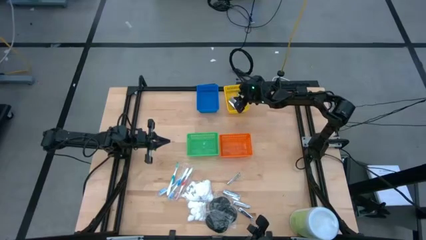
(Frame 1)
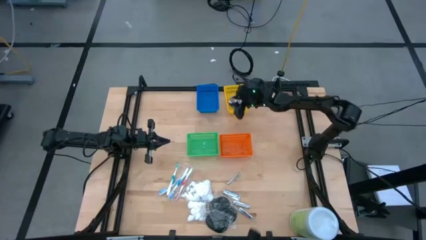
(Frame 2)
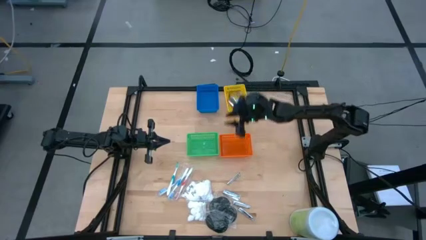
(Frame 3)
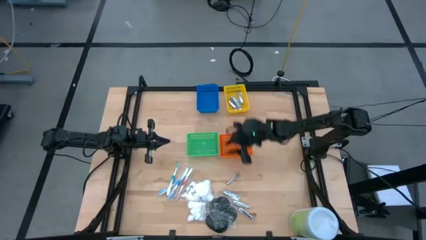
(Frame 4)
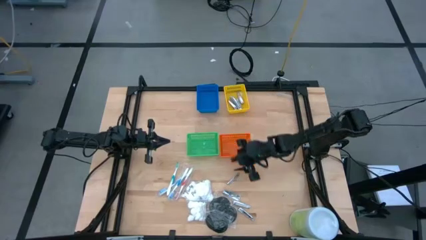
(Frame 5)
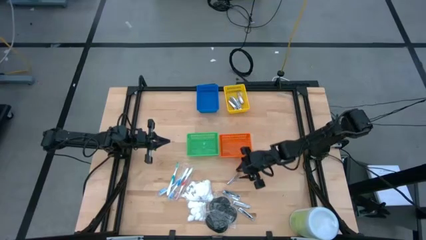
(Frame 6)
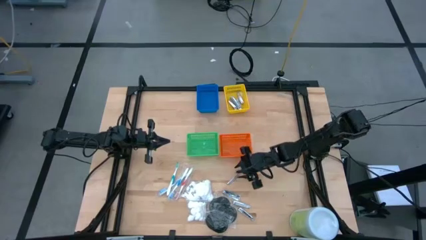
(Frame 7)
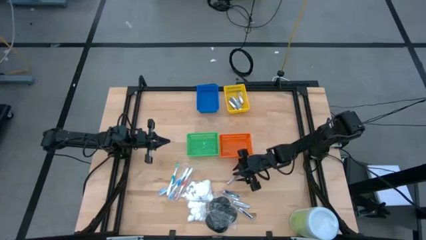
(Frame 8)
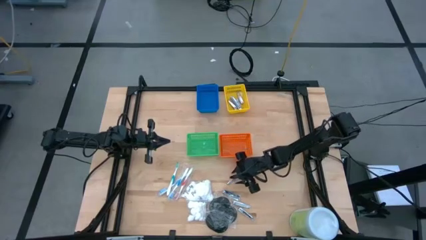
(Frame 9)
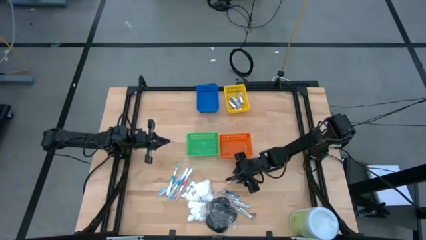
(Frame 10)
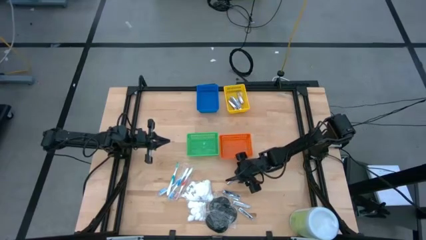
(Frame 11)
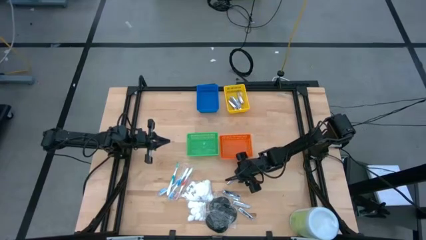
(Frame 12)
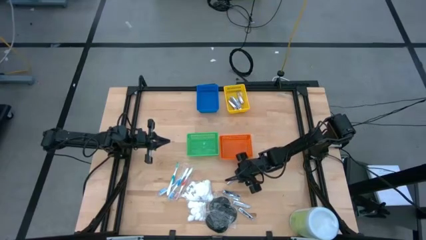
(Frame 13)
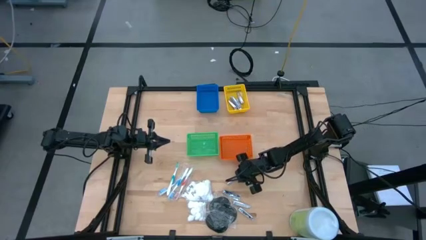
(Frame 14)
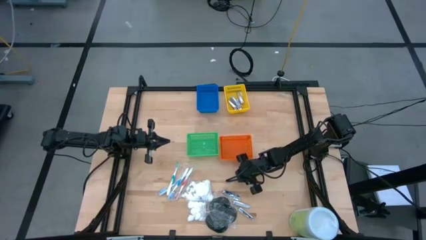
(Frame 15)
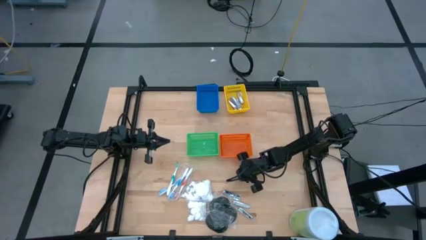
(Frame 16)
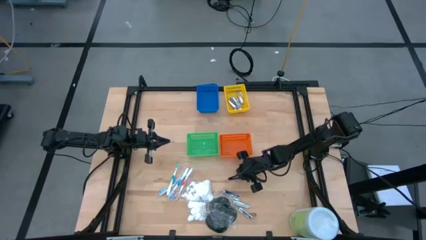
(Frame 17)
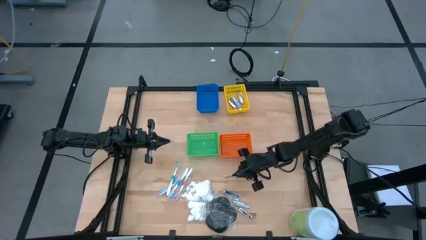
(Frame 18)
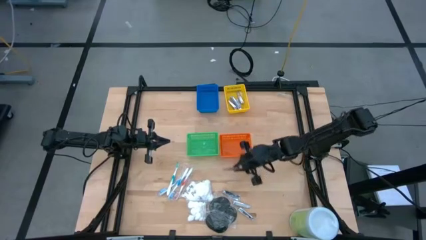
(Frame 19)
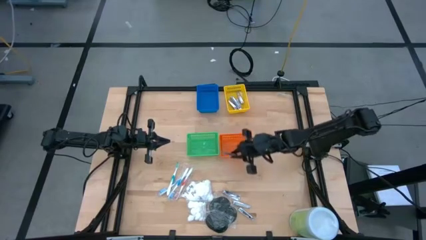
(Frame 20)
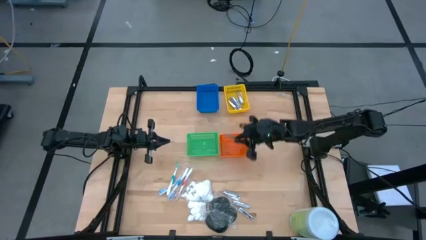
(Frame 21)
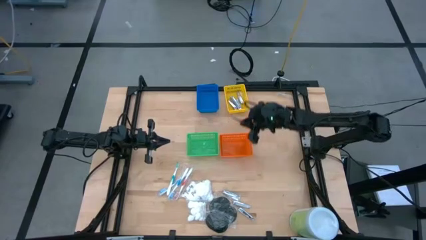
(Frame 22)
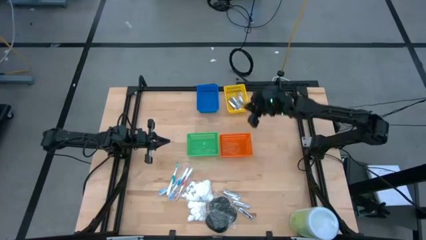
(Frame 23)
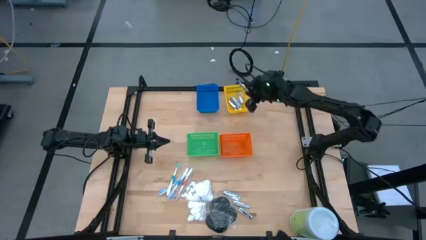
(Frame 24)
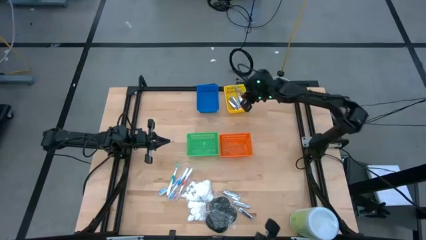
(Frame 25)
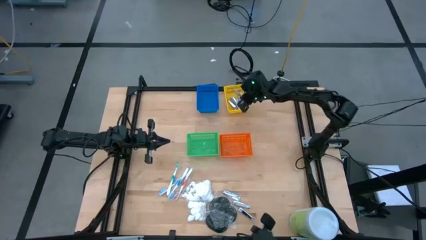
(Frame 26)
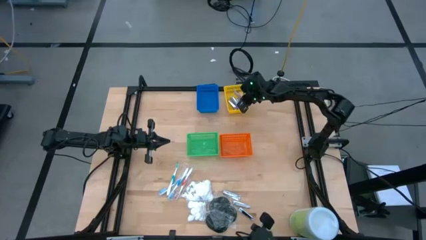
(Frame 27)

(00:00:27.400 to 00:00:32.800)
Task: Pick & Place Travel size toiletries
Put the nail cutter into the yellow bin

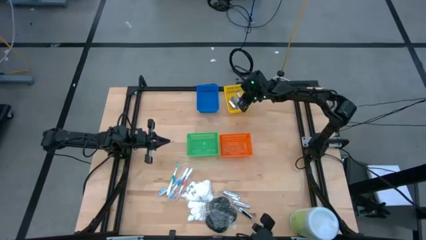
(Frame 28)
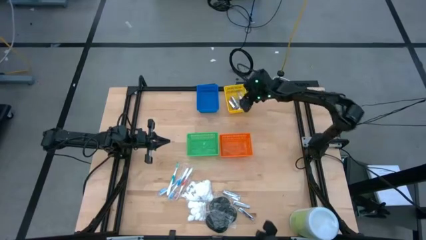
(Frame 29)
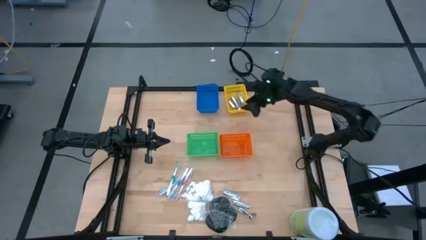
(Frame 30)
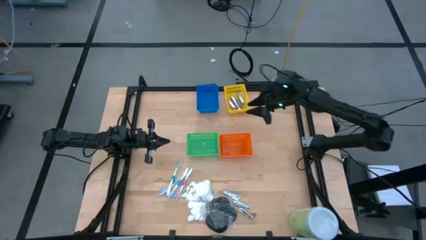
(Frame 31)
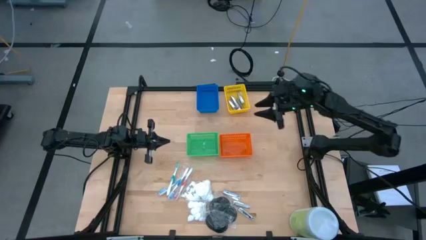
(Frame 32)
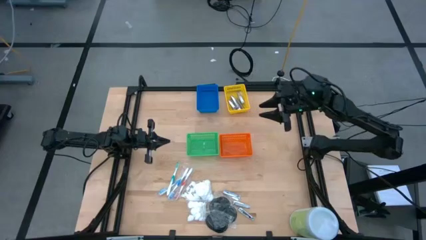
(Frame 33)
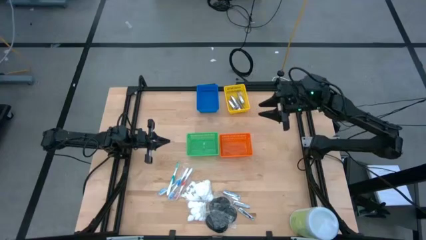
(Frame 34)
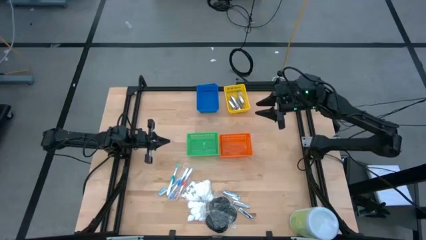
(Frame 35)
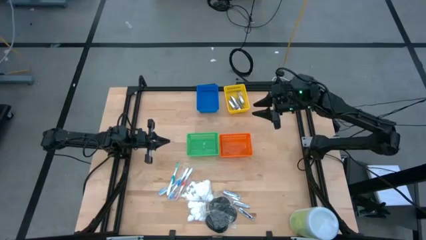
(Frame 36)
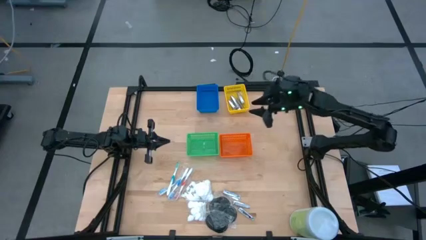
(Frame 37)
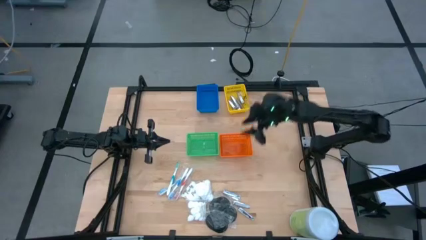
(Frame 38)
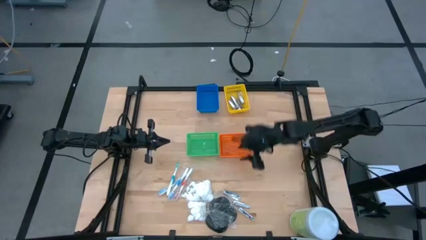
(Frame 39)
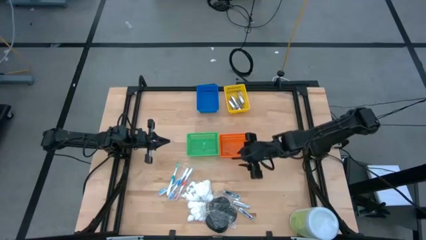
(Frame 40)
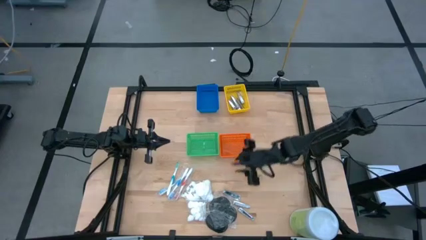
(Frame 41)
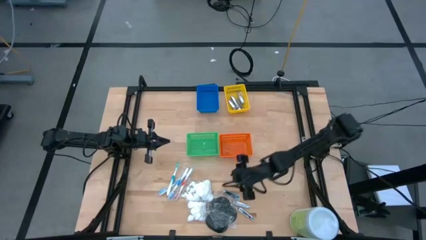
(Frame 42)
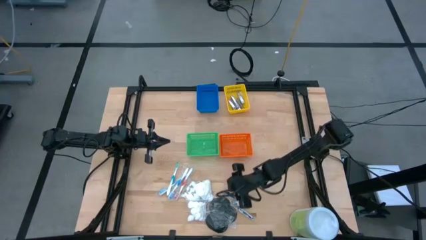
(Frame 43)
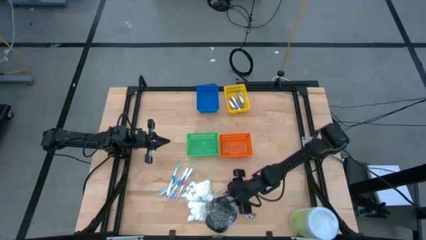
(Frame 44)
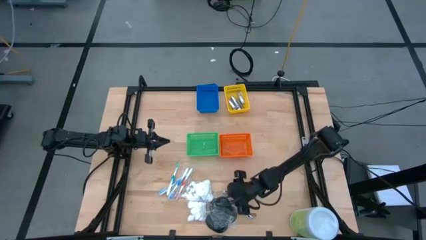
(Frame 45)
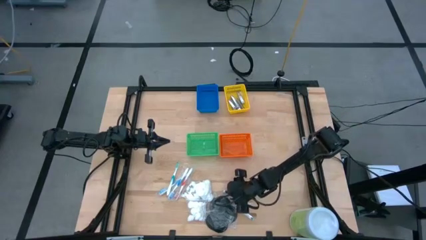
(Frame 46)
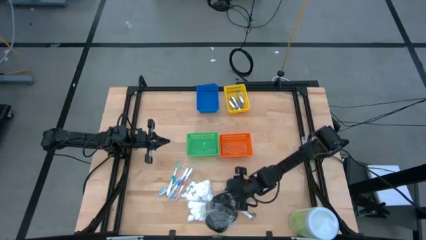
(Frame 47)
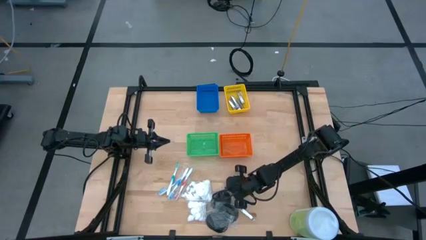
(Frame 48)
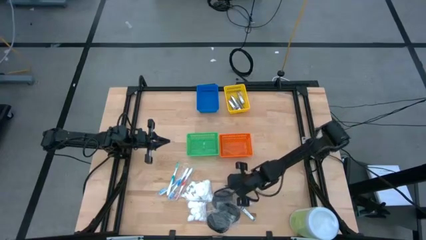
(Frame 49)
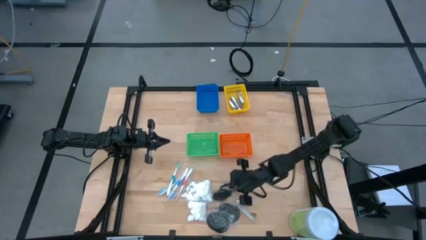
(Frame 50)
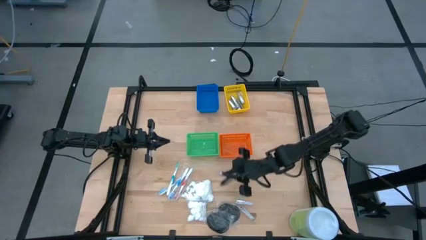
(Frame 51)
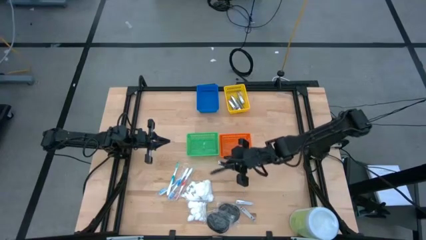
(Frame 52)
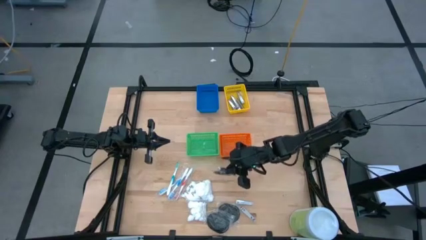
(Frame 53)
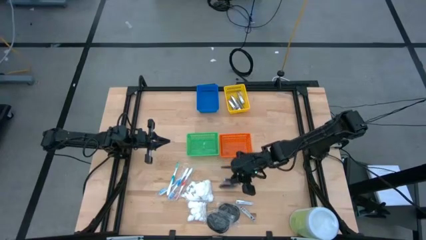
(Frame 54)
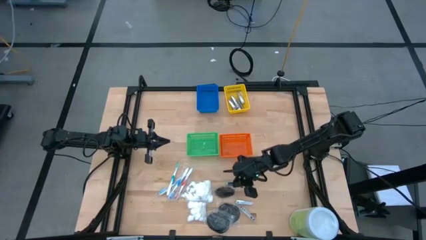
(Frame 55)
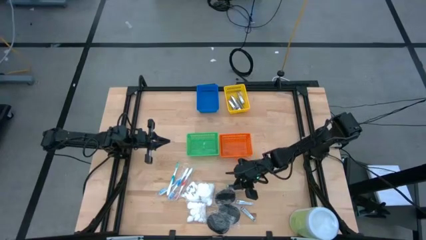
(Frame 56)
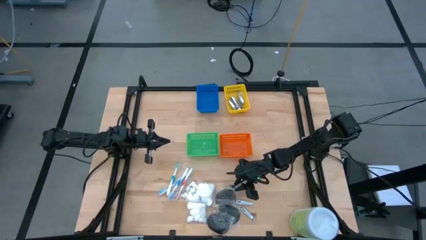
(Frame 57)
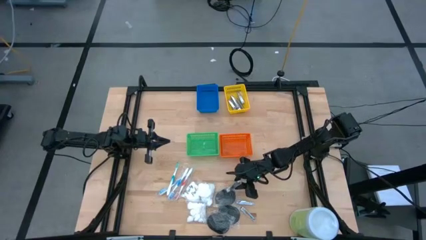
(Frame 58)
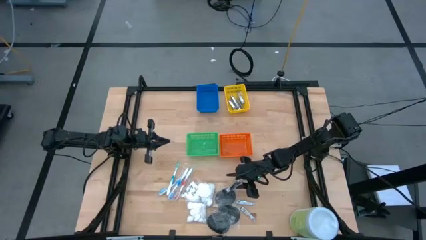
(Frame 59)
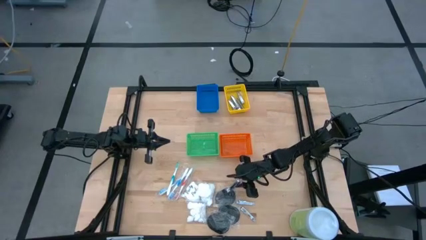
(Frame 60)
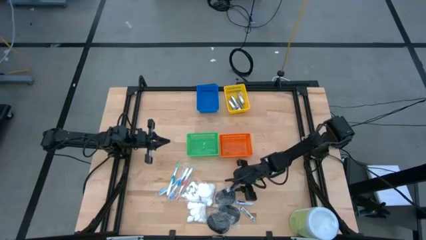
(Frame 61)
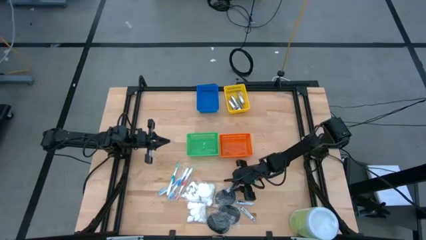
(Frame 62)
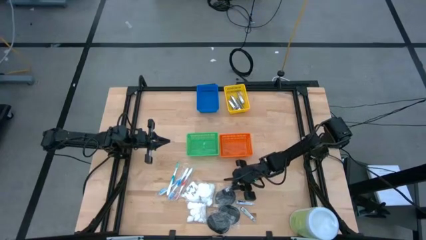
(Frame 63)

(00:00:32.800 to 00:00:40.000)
Put the top nail cutter into the yellow bin

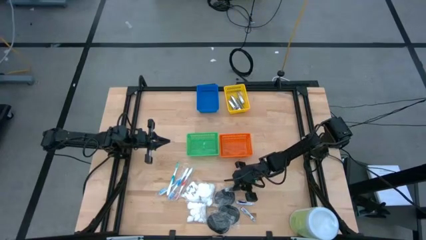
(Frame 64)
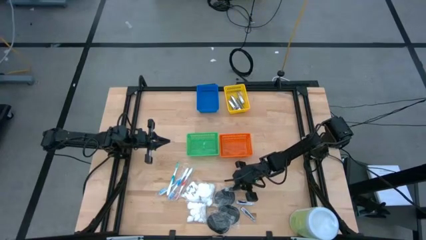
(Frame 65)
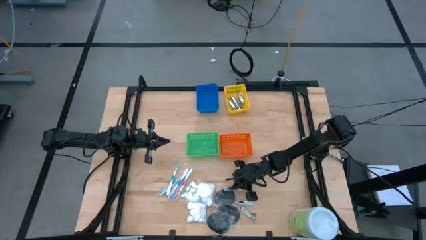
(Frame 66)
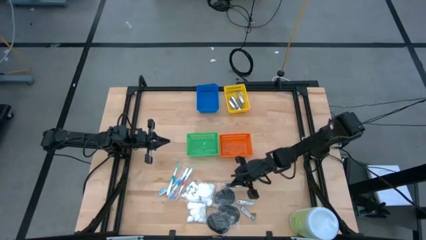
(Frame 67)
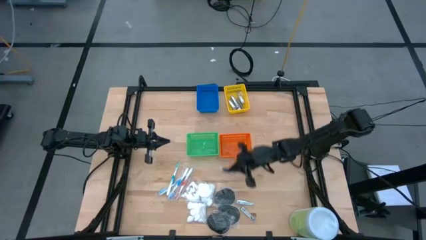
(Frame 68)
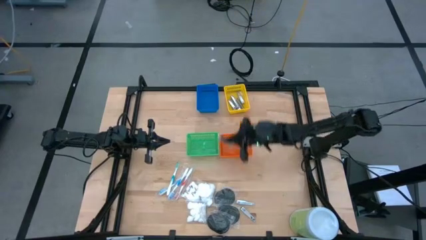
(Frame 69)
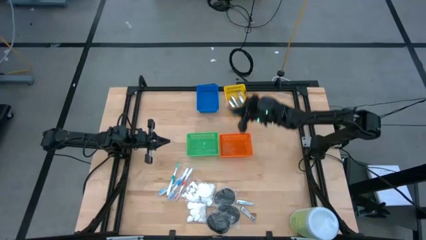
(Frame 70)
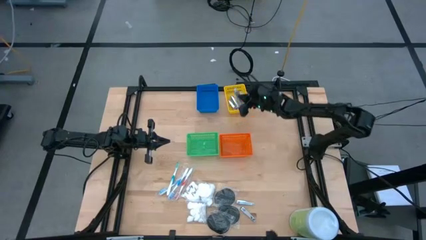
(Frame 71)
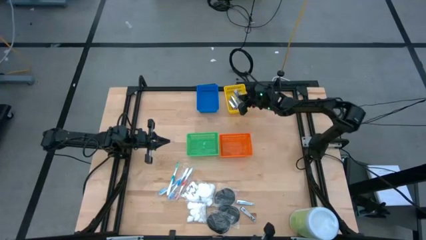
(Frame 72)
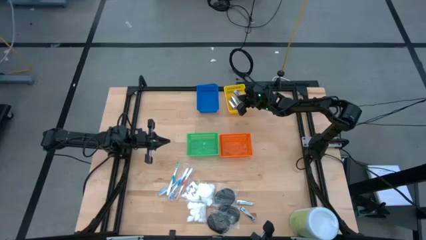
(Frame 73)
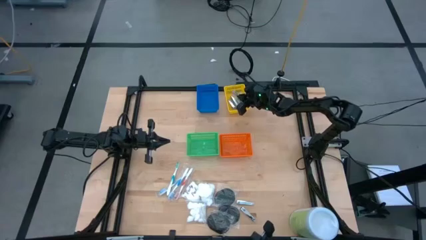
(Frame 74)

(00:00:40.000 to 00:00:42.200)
Put the top nail cutter into the yellow bin

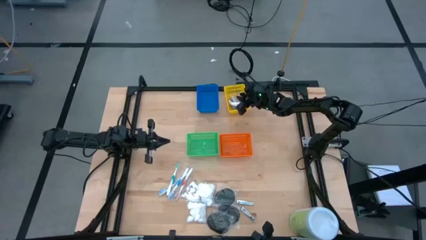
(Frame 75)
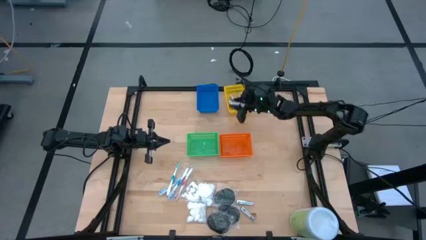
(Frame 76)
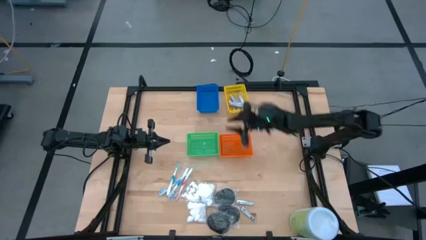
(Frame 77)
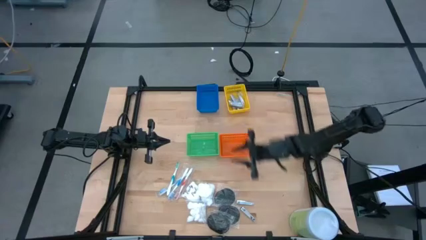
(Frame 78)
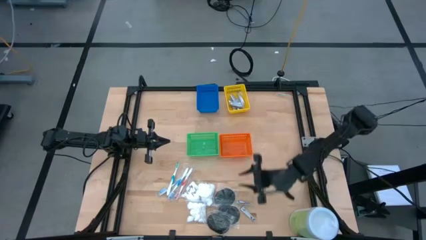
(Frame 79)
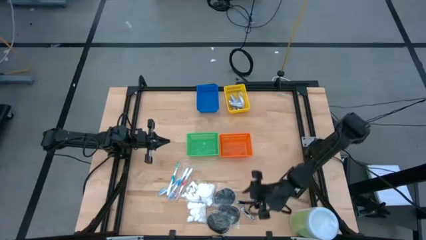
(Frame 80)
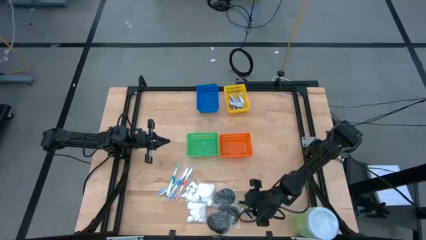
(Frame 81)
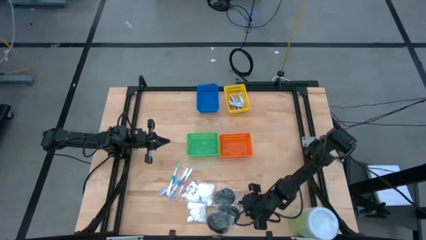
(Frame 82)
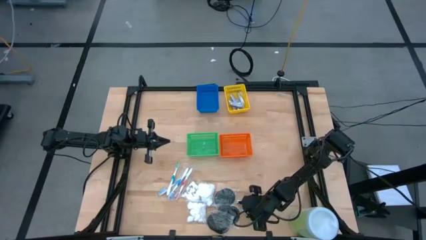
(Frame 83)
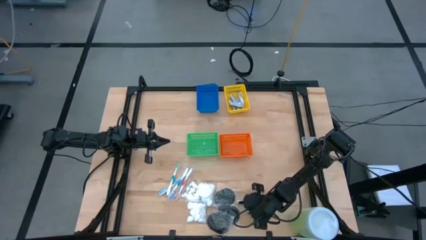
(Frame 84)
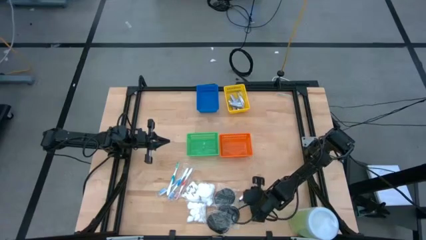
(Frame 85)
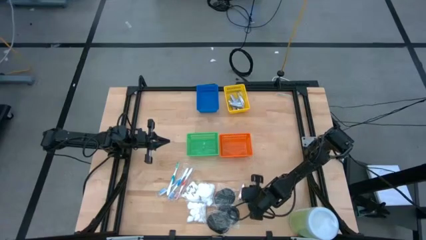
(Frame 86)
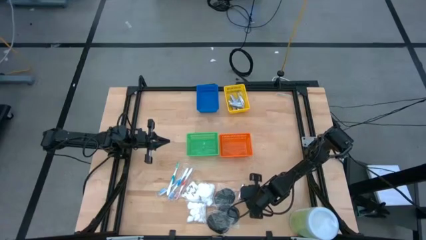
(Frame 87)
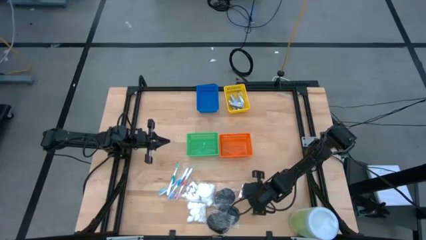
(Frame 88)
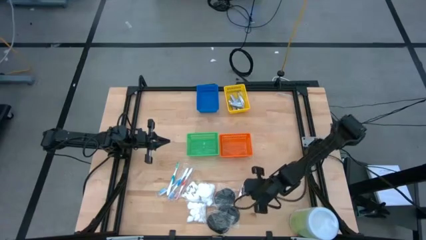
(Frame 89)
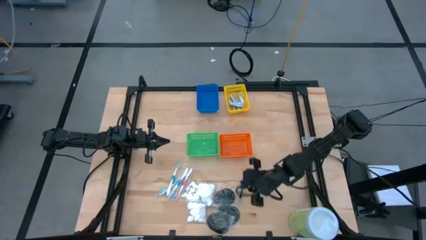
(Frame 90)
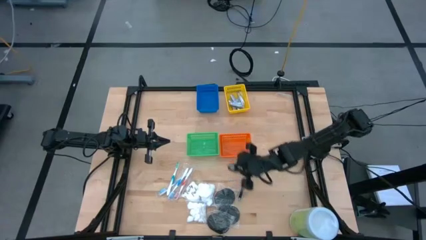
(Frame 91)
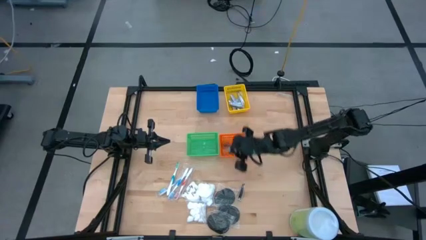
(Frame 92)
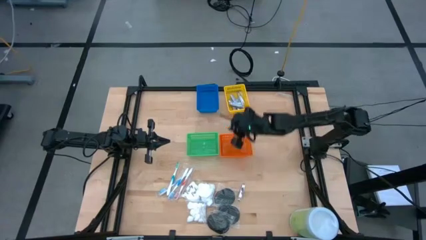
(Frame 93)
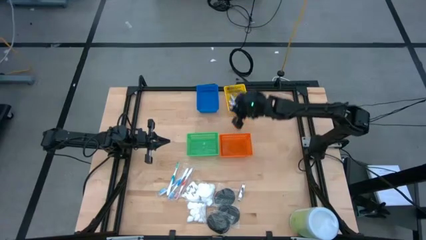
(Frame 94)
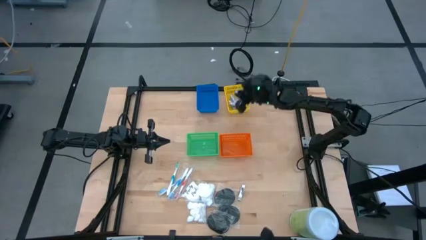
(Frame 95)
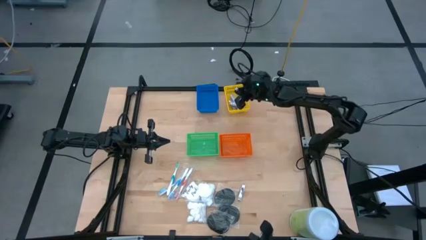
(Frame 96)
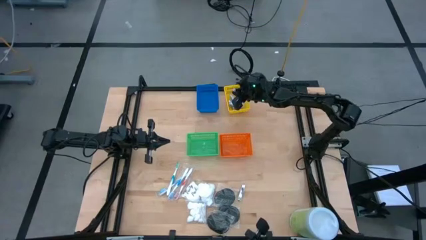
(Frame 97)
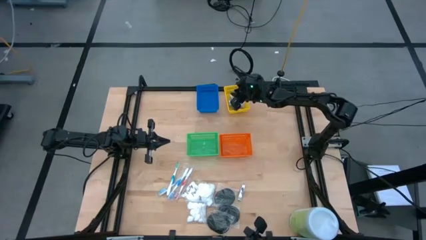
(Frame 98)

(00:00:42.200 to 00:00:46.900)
Put the bottom nail cutter into the yellow bin
